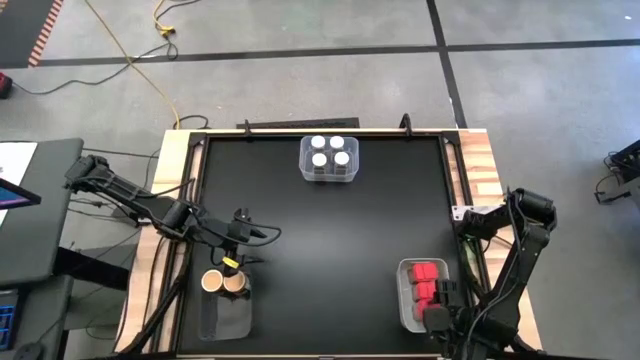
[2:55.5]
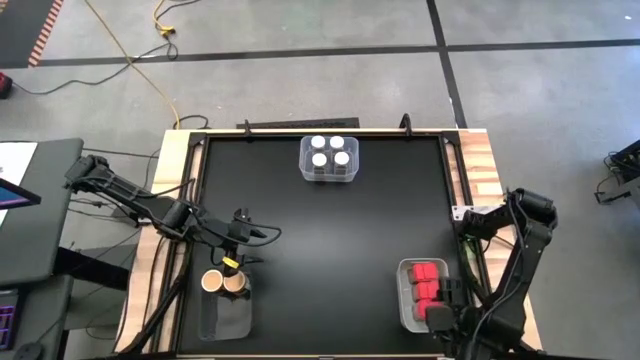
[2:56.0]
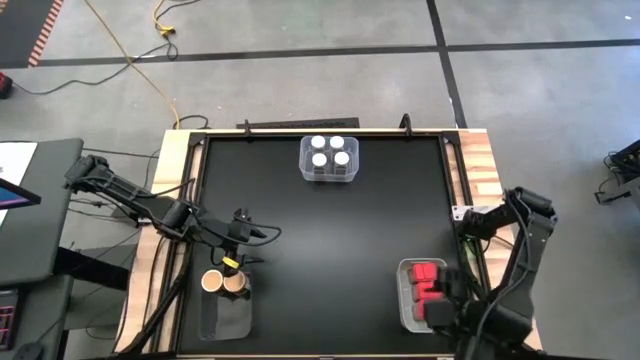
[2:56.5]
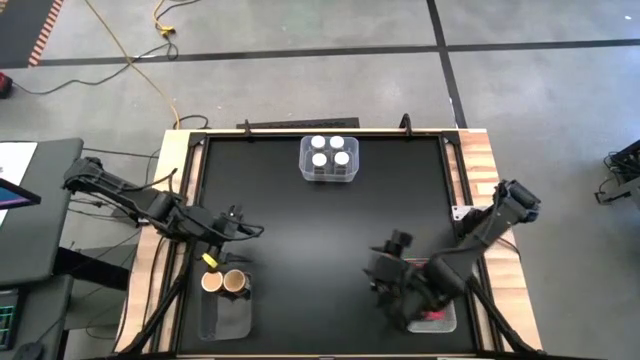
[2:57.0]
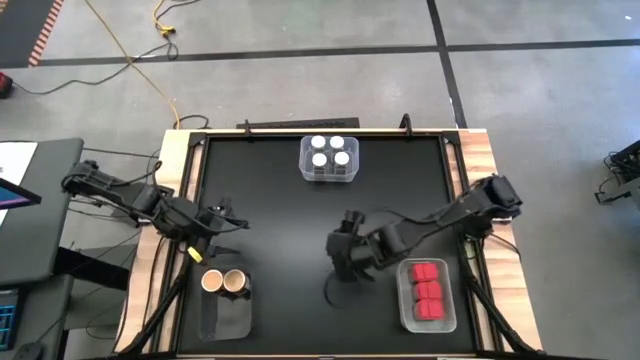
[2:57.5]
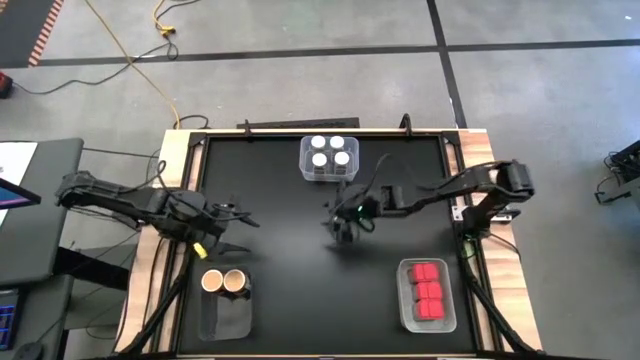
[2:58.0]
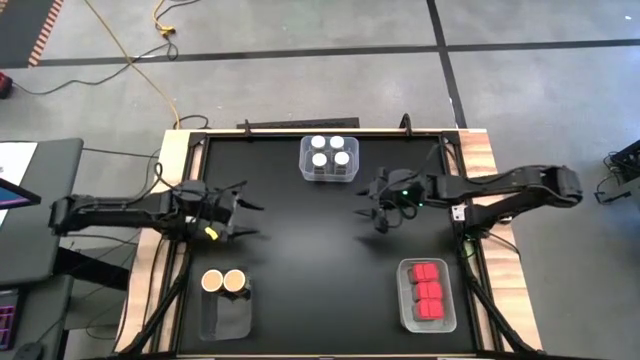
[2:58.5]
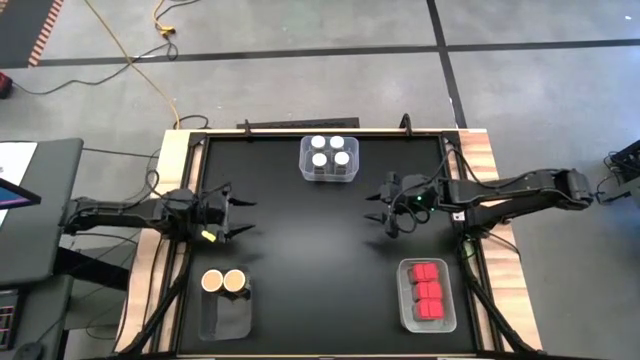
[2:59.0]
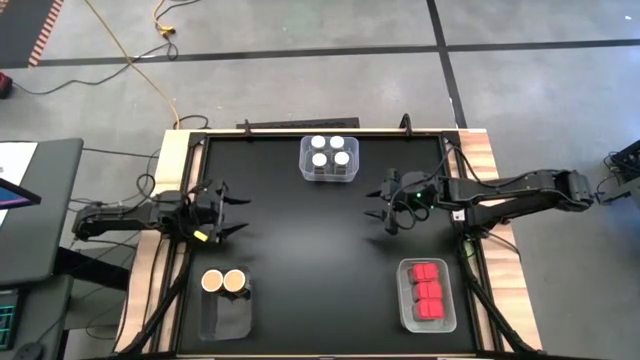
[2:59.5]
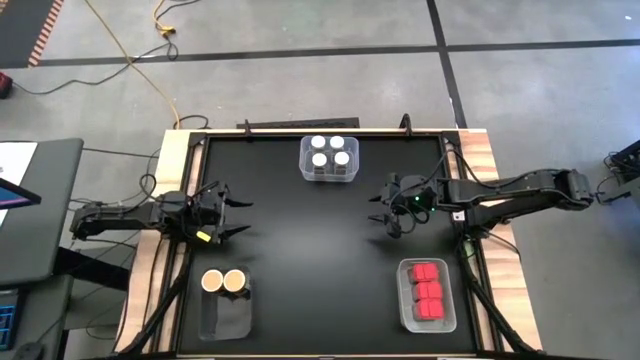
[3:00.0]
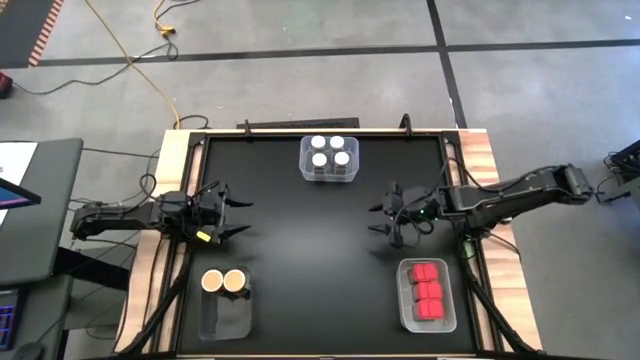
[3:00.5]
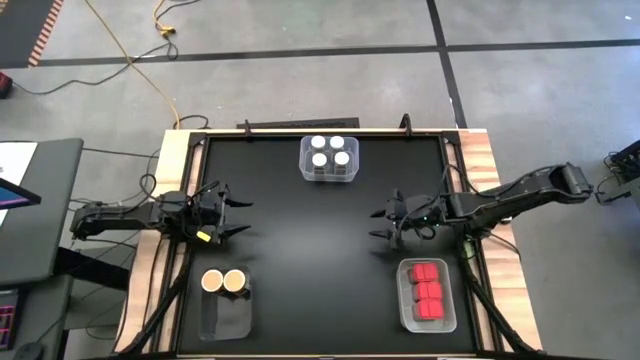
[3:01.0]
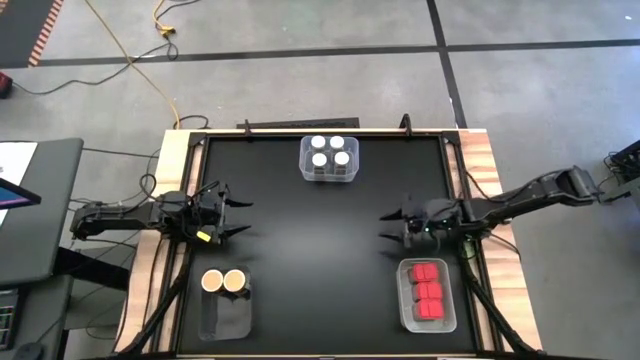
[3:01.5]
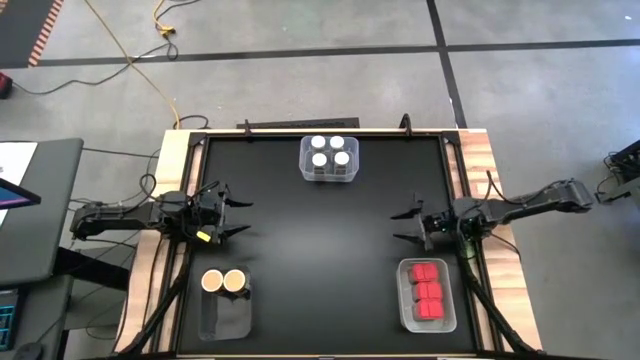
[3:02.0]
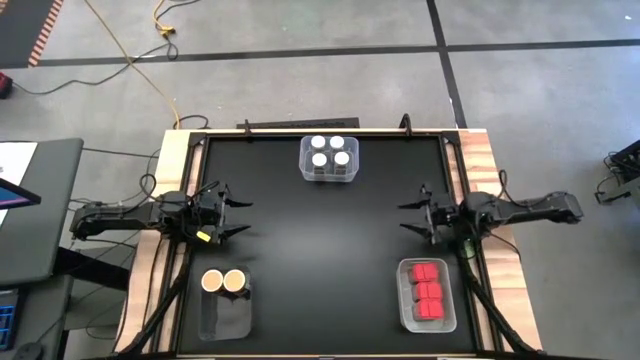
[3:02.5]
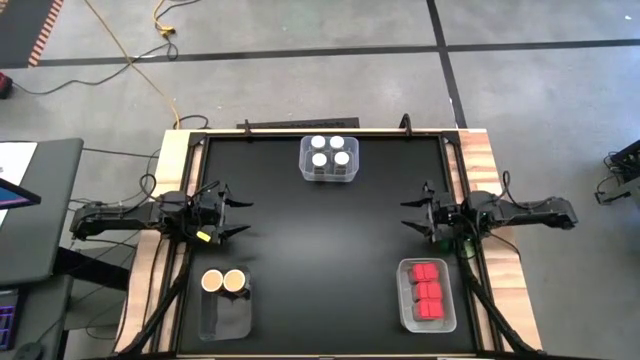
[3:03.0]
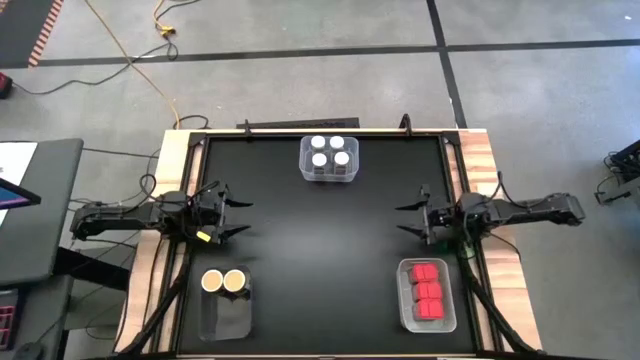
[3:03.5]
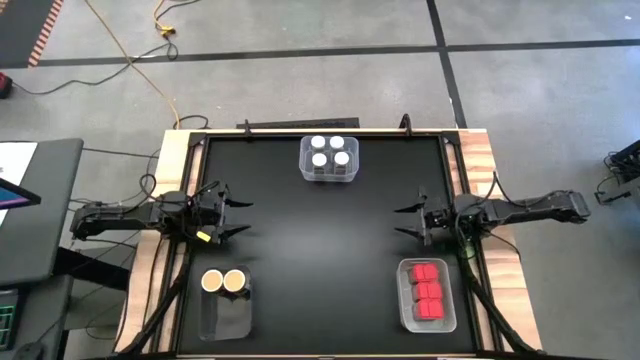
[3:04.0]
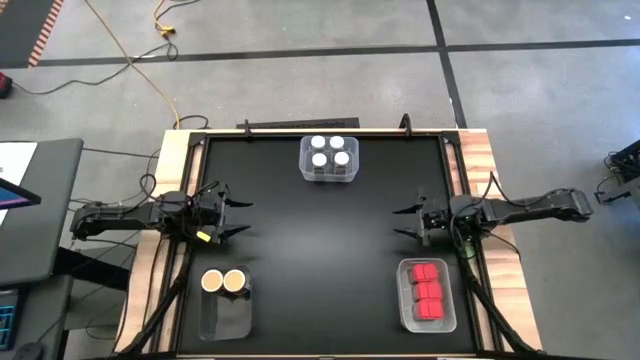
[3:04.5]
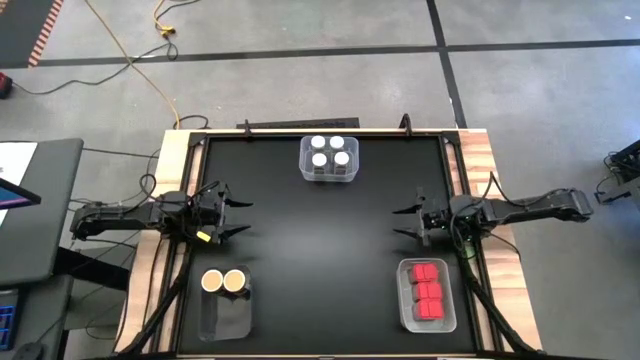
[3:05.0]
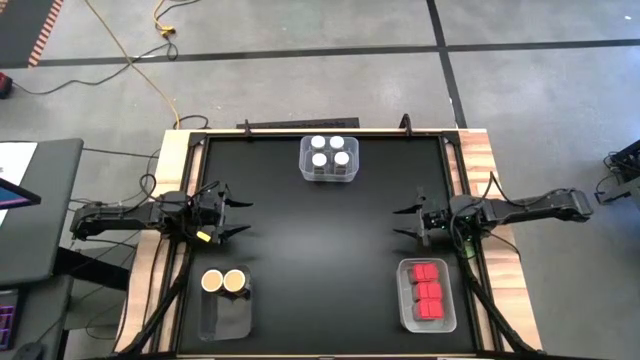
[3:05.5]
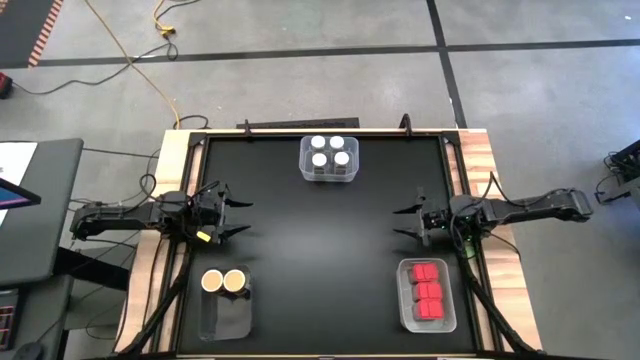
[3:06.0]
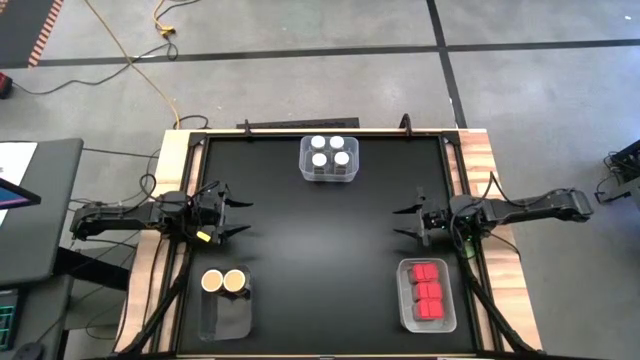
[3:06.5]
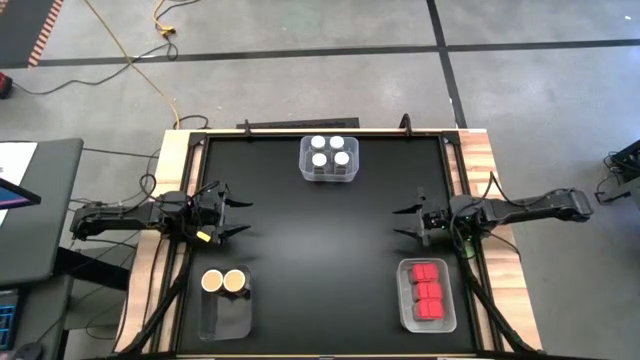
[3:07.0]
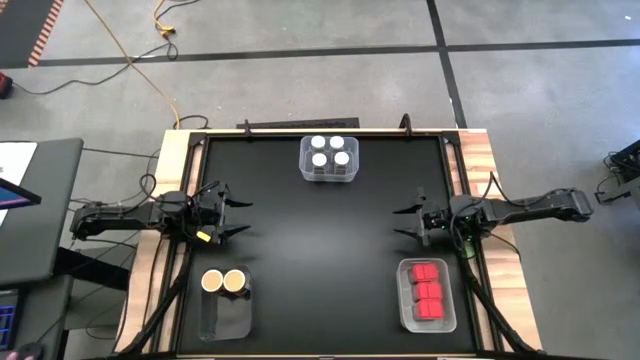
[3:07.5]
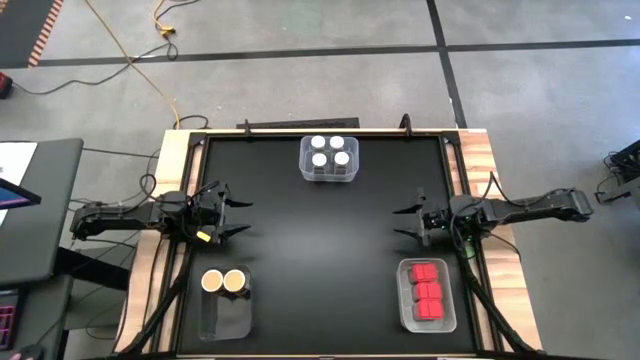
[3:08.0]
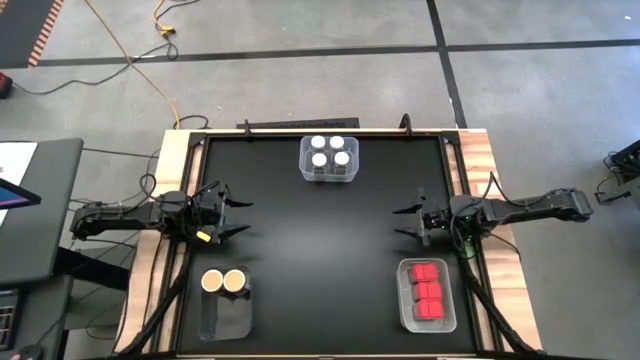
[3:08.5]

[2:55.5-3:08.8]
Task: Sort spices by type
Return to Home Position
